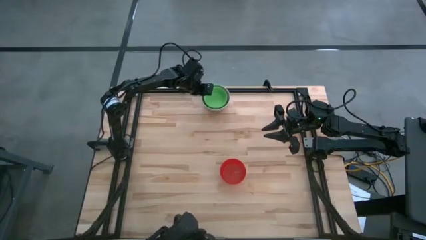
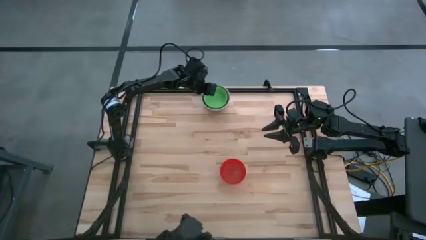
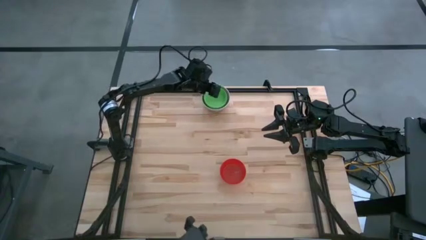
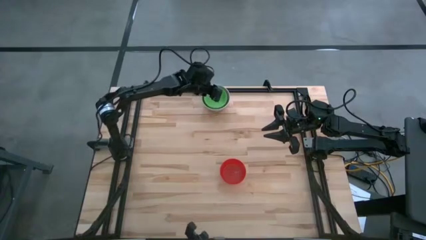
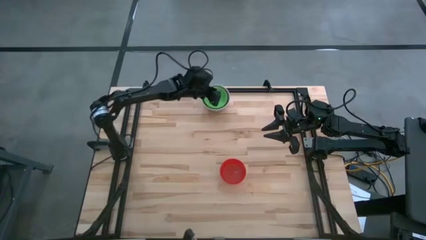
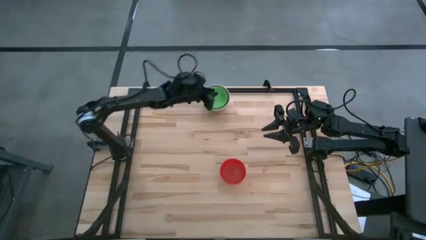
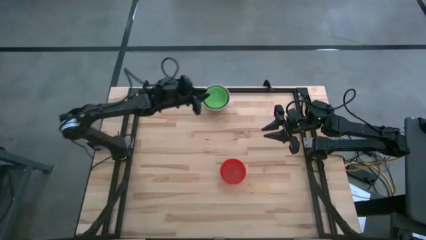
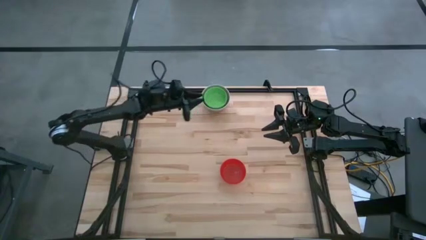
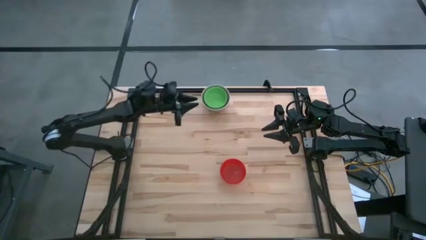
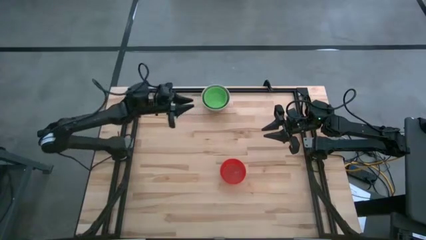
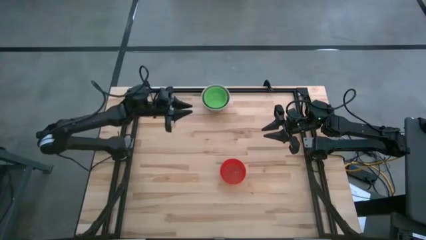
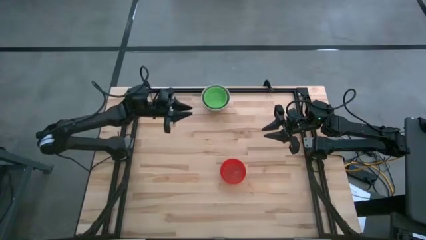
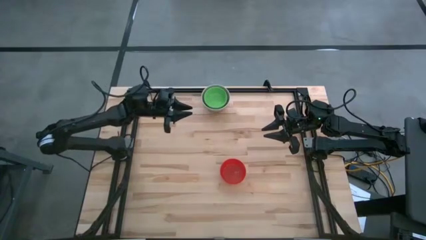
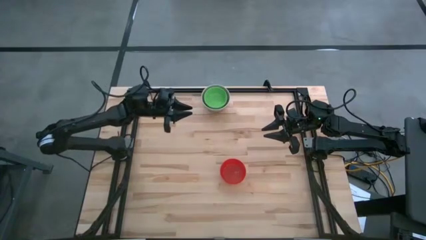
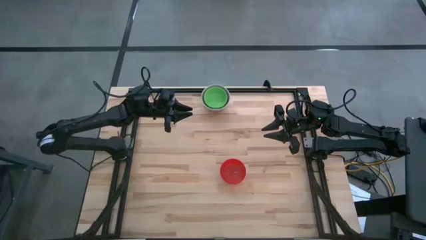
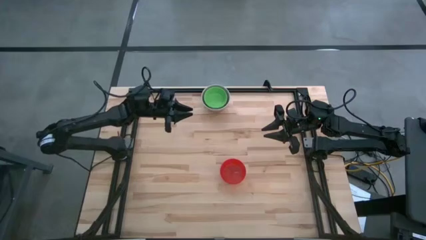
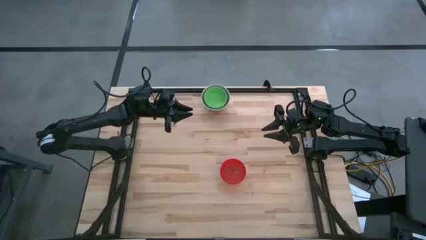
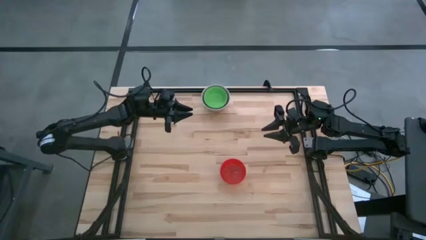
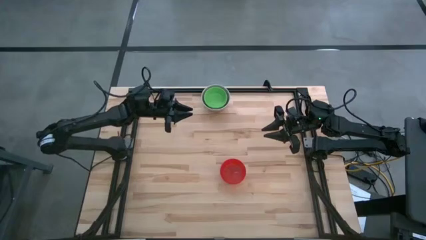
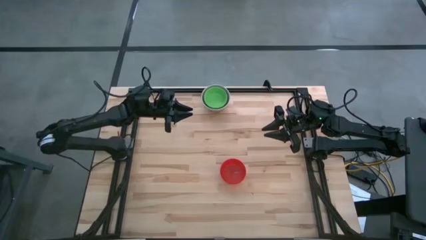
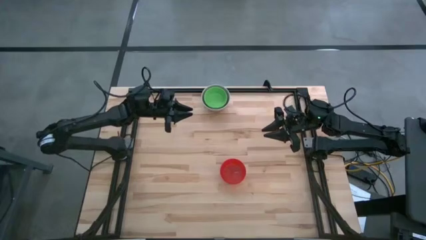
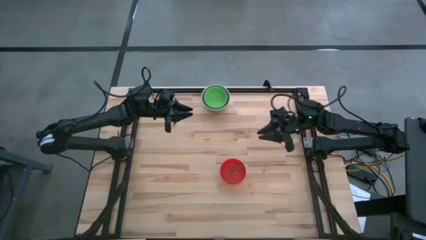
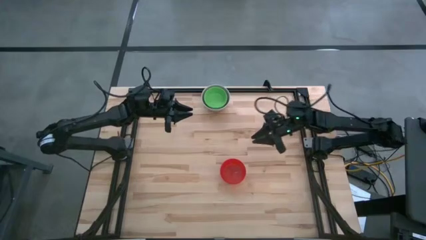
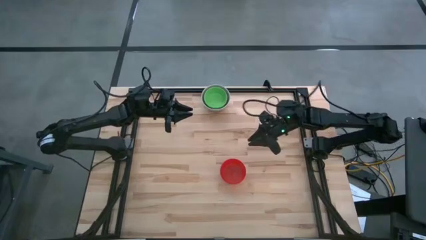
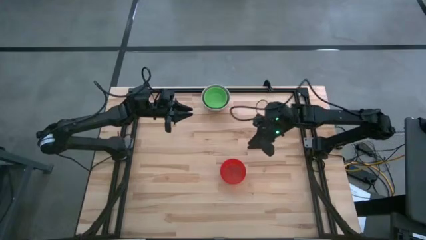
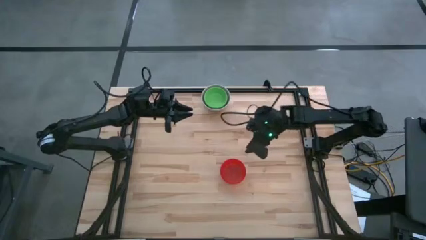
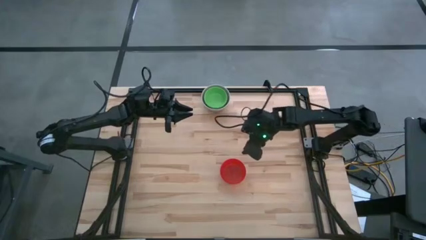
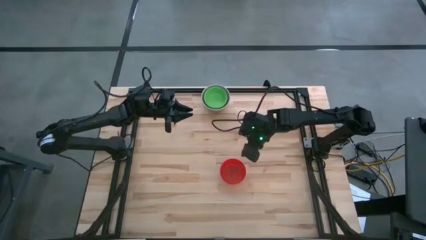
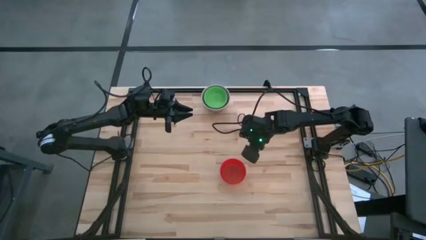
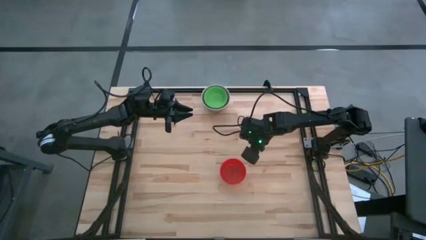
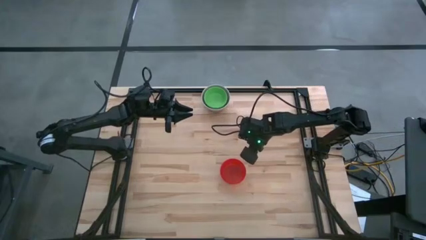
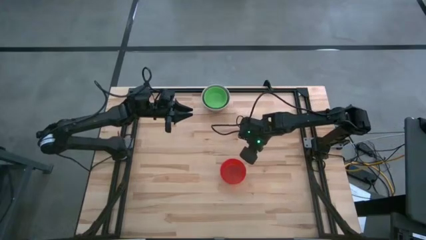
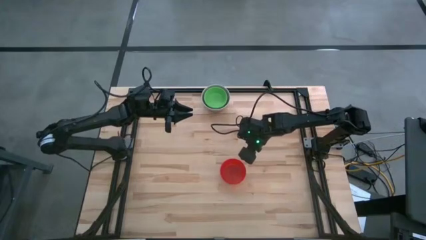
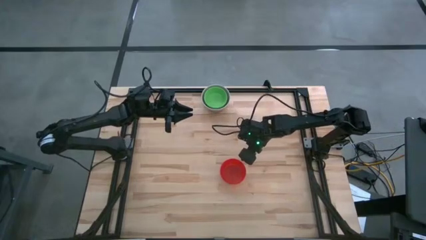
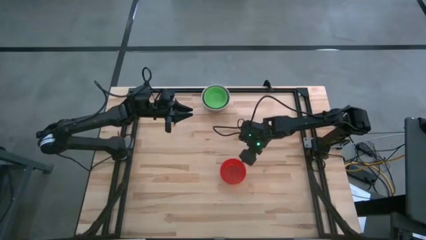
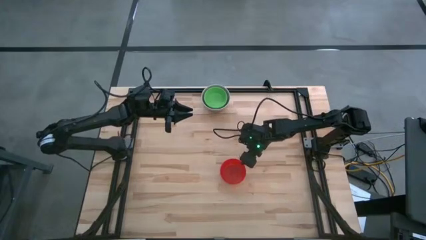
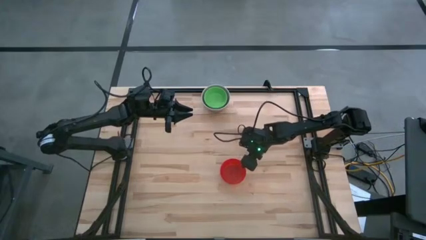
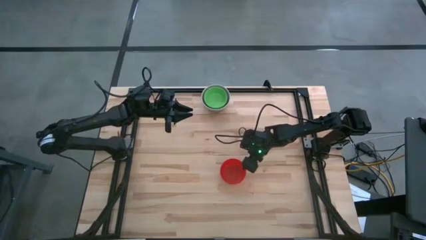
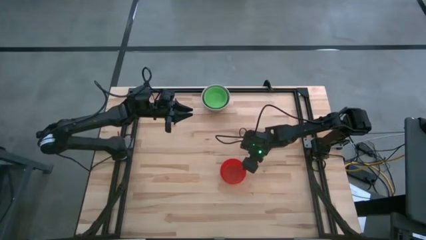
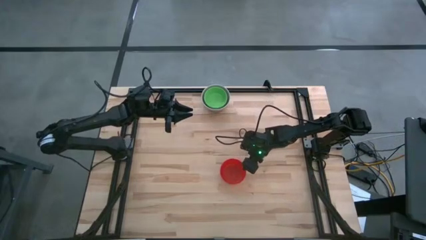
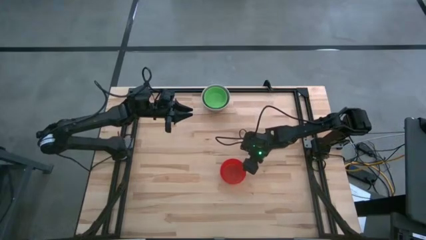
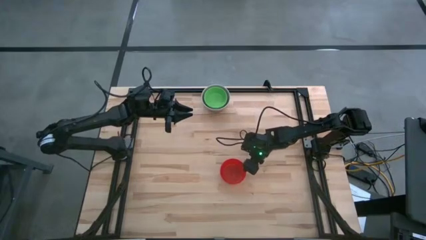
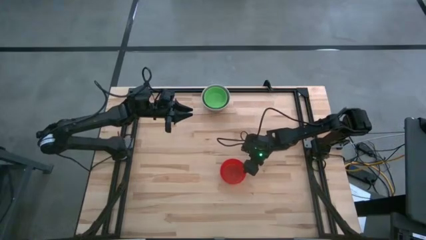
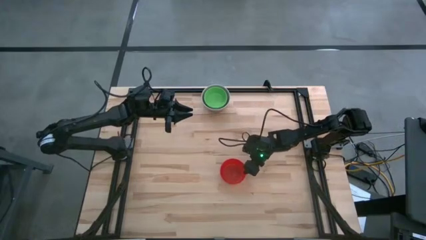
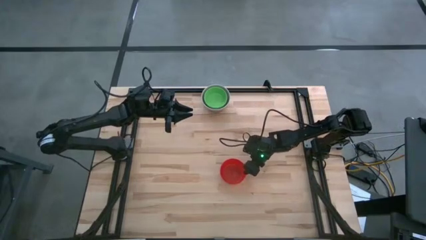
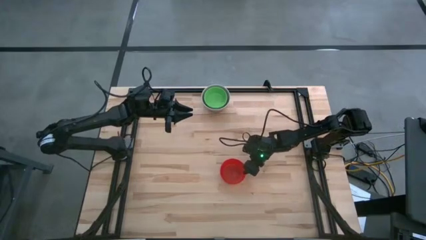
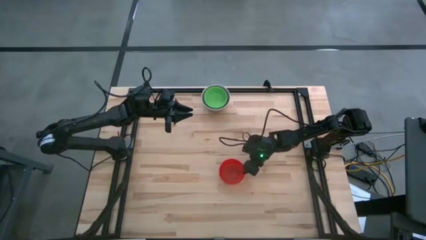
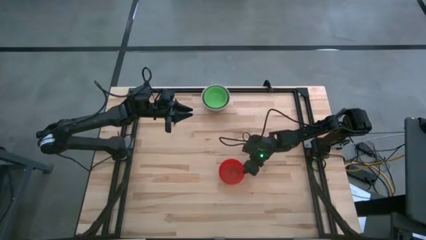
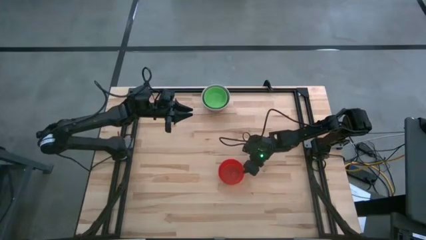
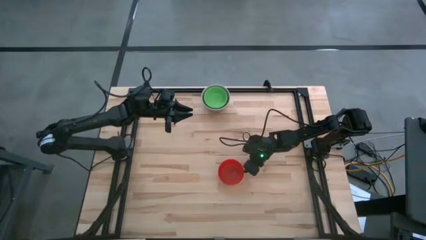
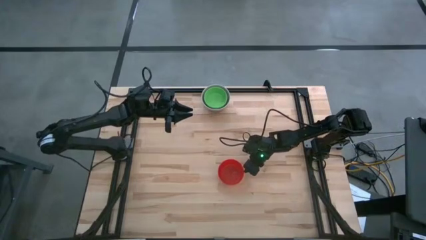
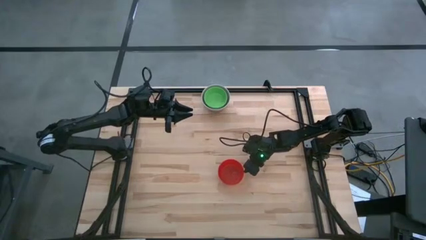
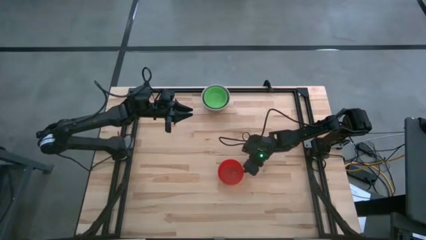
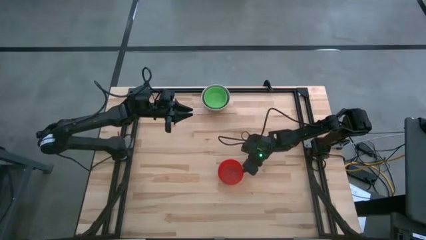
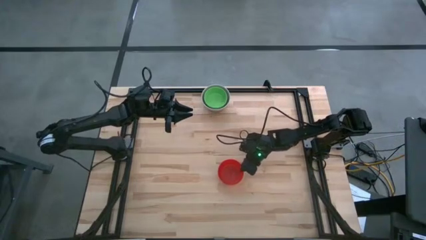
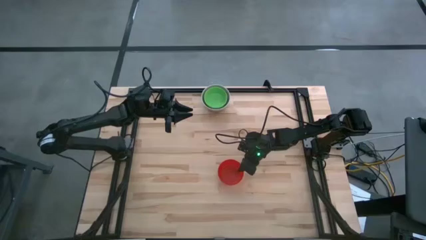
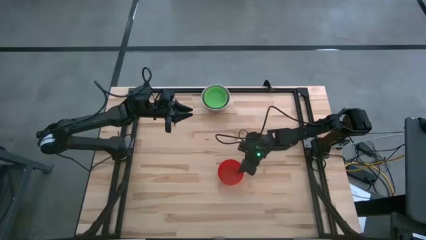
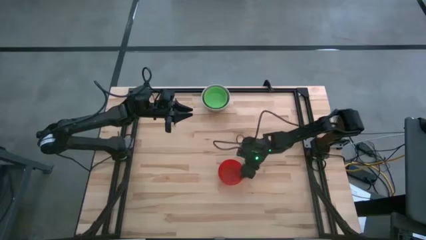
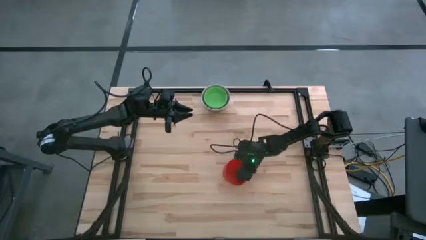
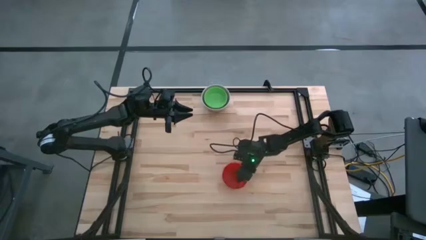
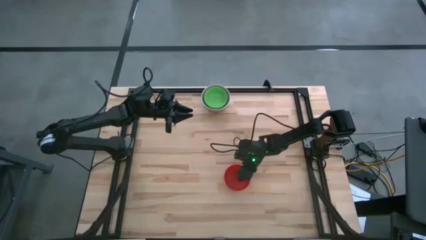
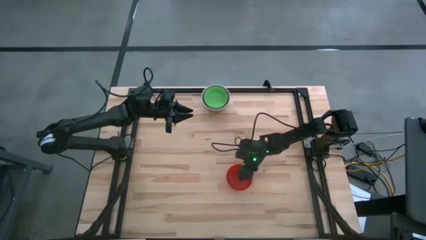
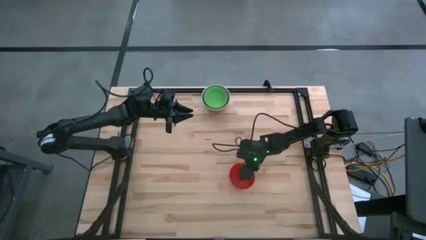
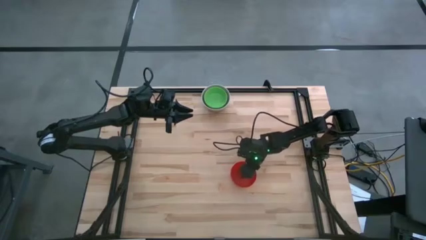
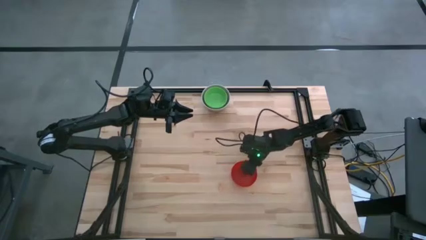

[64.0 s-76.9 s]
Stack the red bowl on top of the green bowl

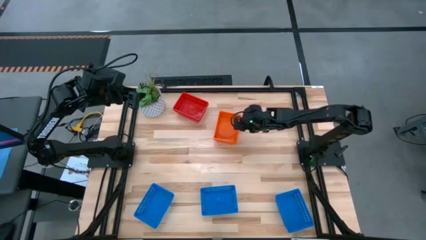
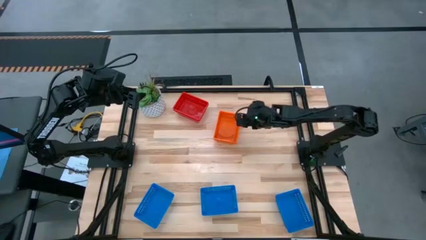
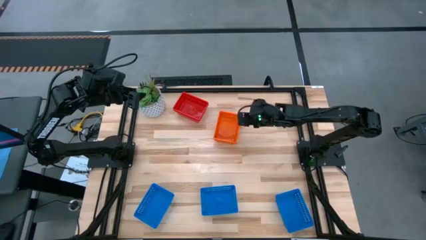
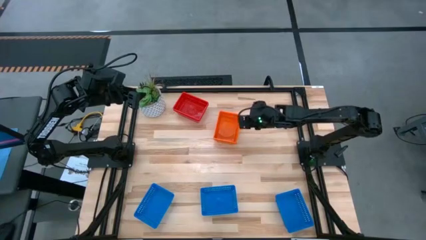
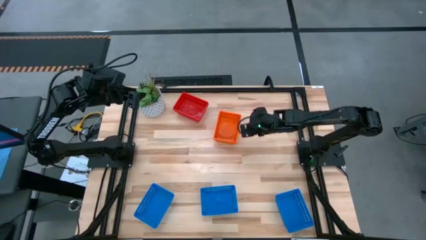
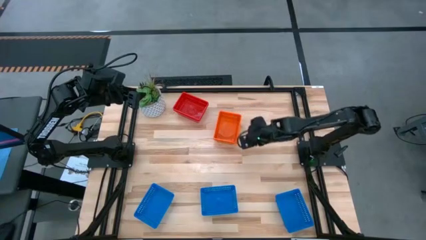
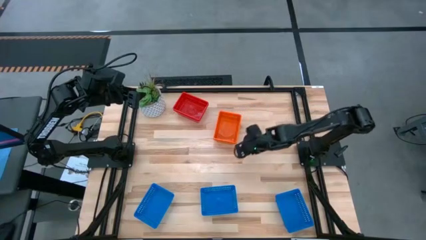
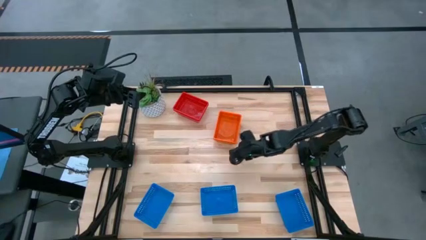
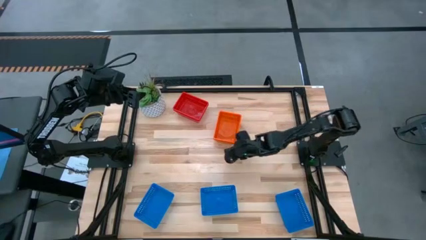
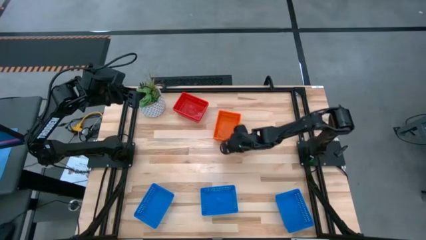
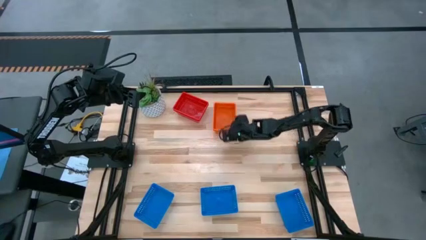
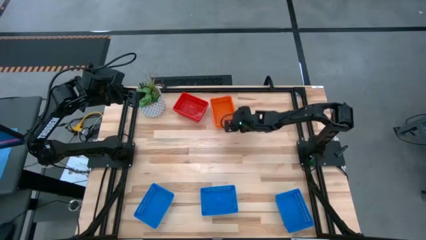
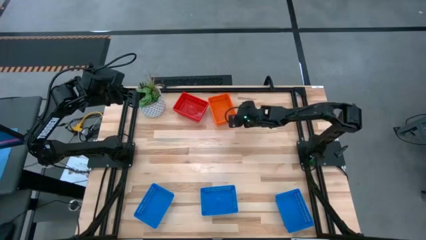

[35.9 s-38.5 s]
Adjust the stacked orange bins
